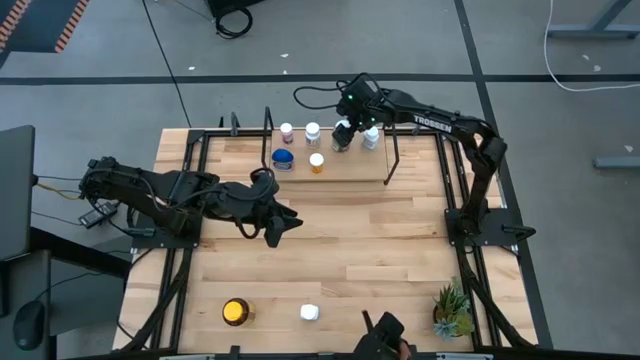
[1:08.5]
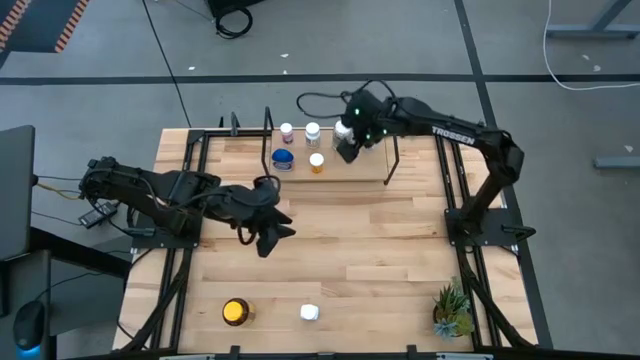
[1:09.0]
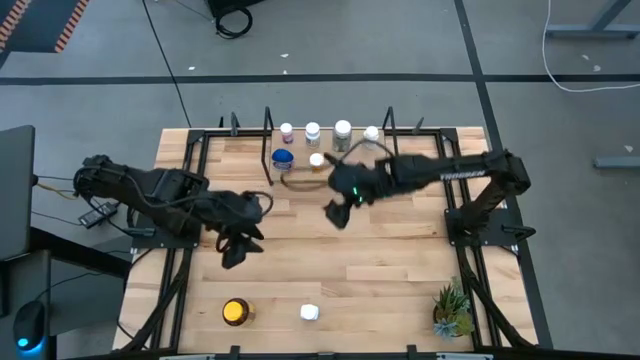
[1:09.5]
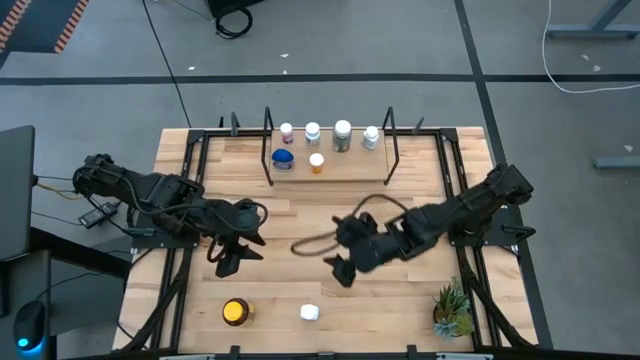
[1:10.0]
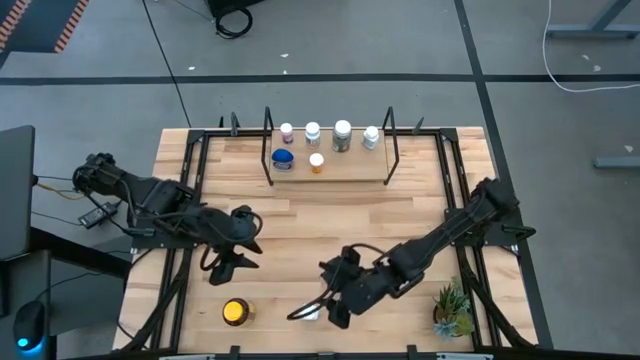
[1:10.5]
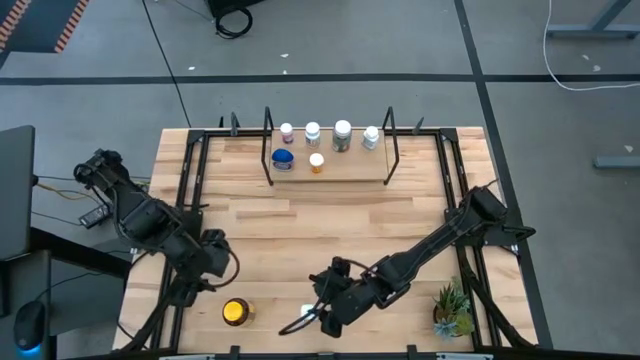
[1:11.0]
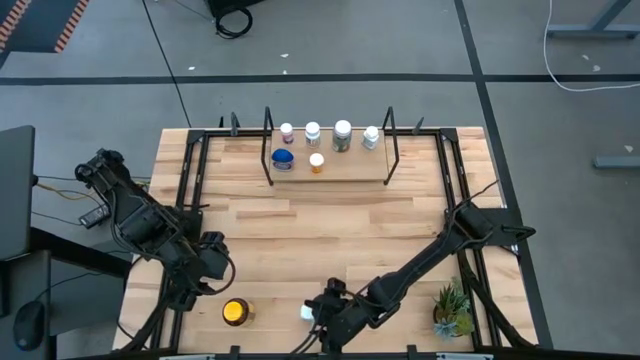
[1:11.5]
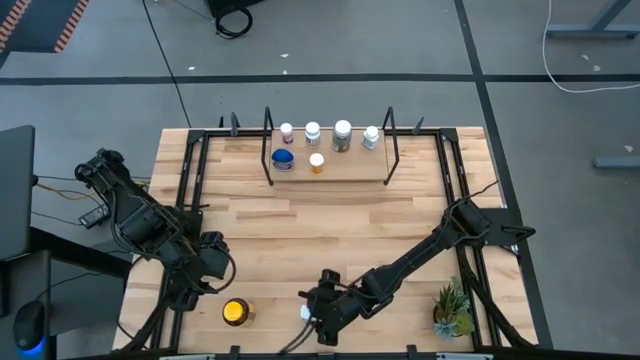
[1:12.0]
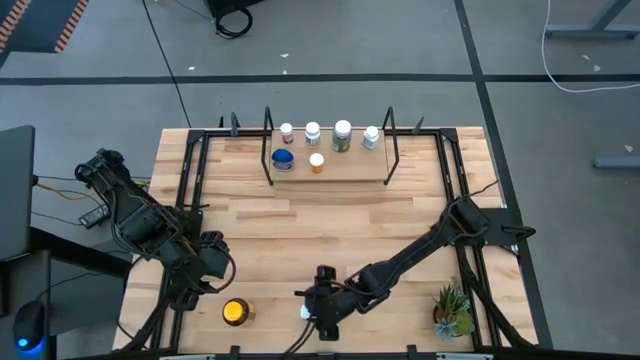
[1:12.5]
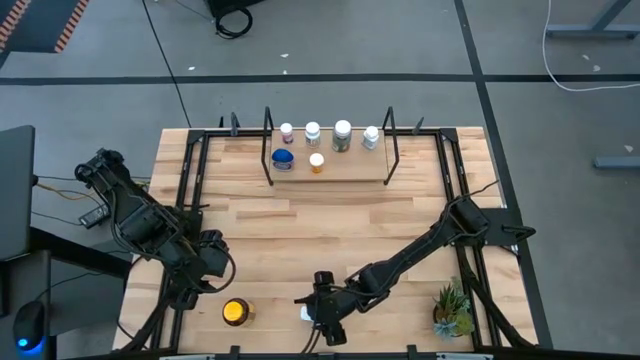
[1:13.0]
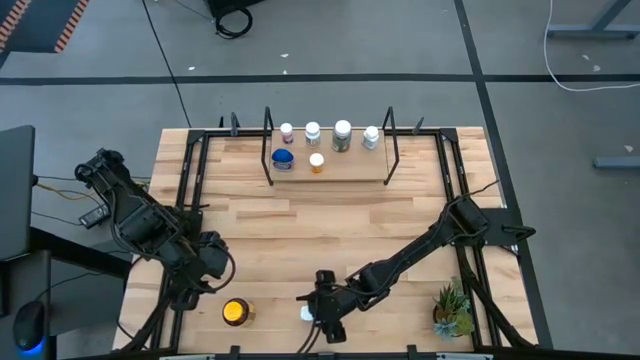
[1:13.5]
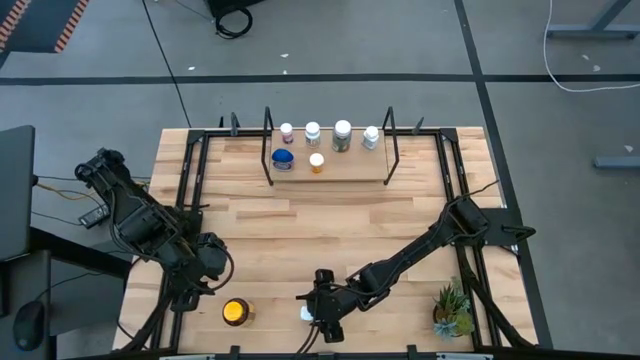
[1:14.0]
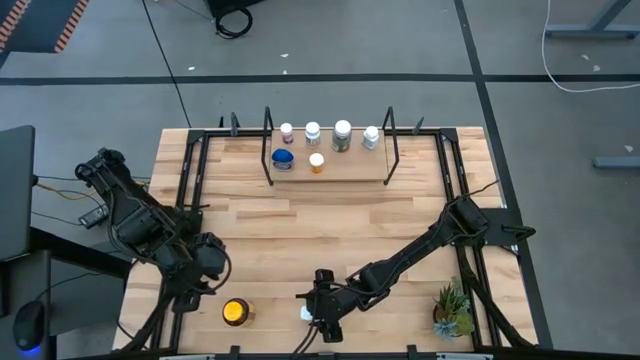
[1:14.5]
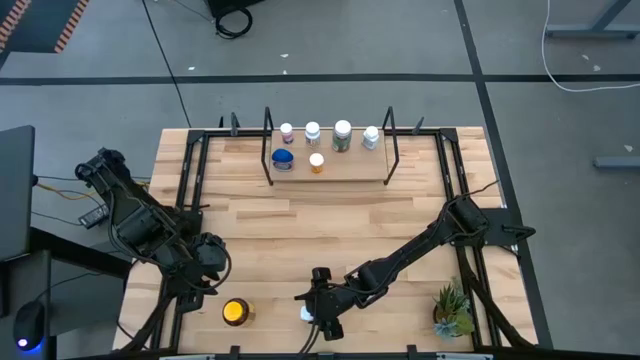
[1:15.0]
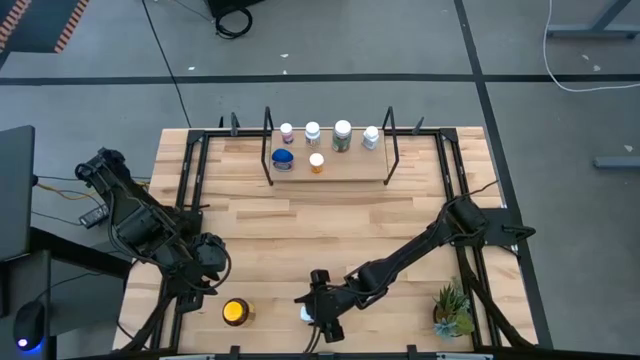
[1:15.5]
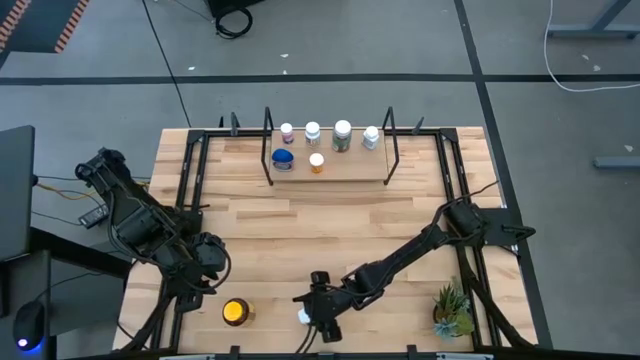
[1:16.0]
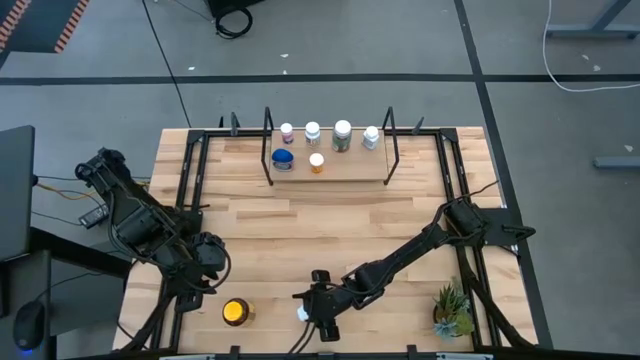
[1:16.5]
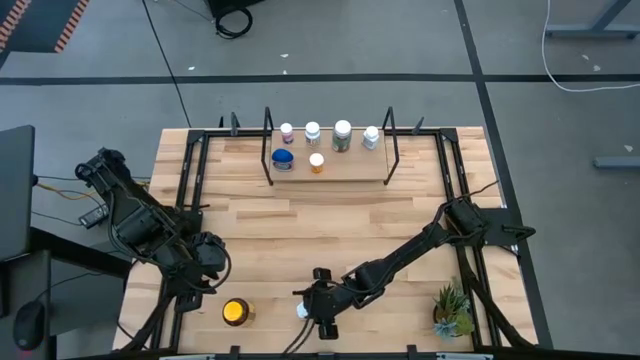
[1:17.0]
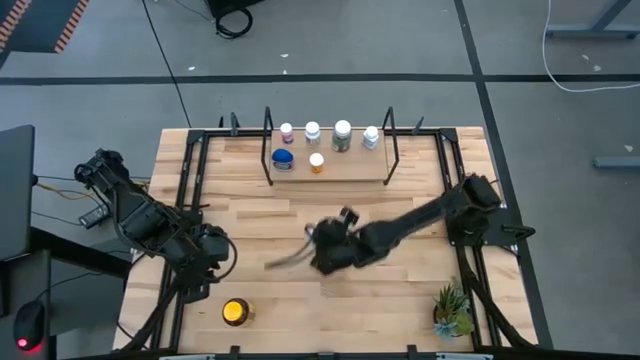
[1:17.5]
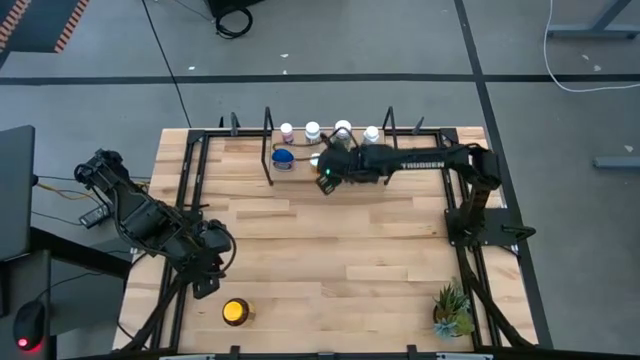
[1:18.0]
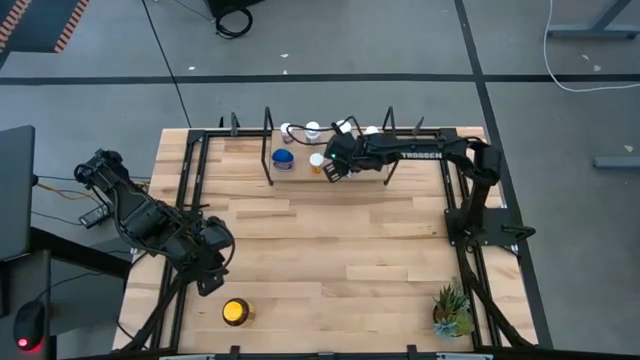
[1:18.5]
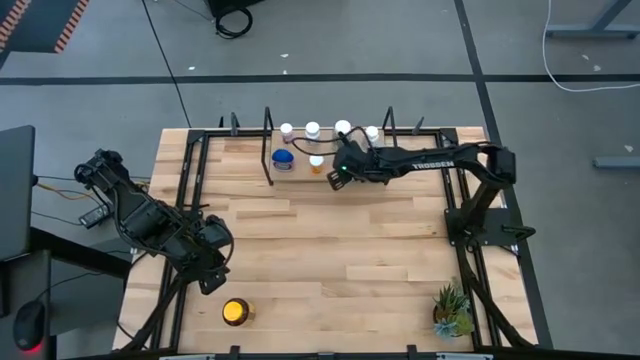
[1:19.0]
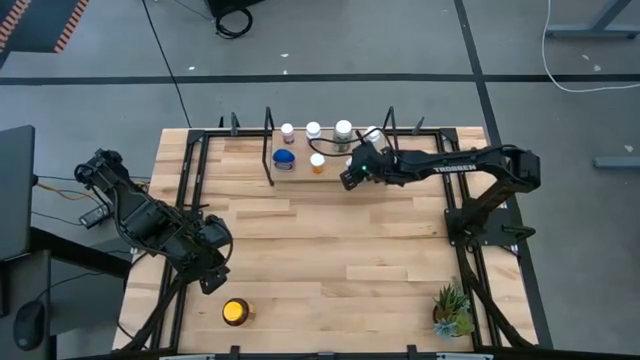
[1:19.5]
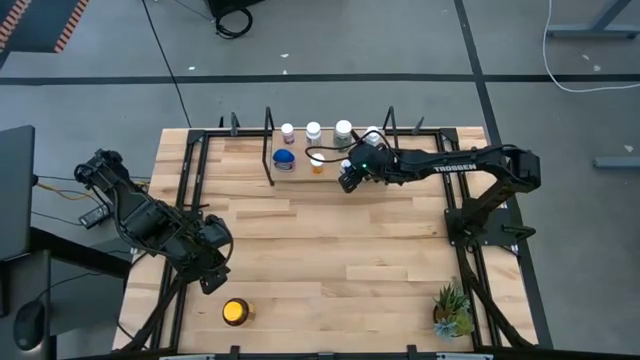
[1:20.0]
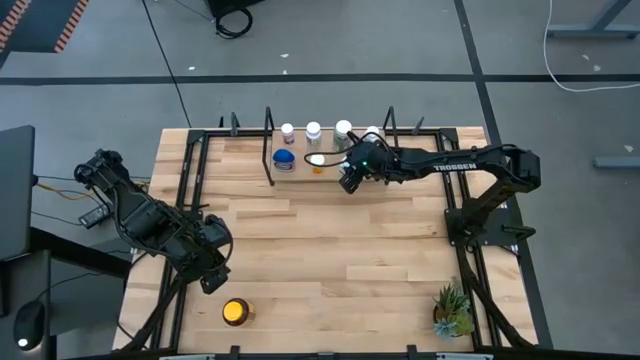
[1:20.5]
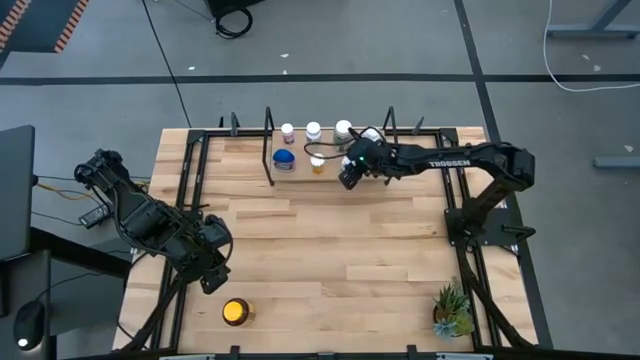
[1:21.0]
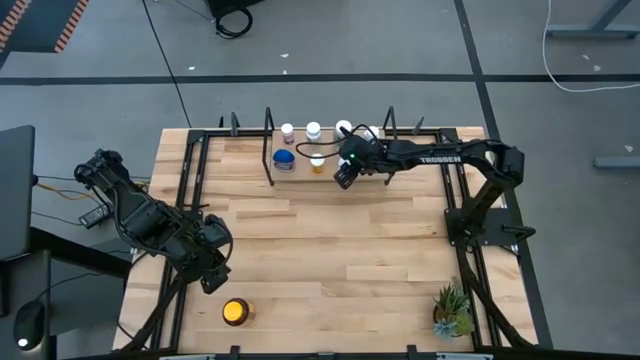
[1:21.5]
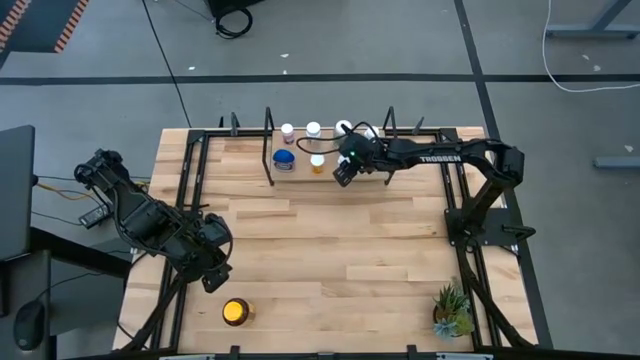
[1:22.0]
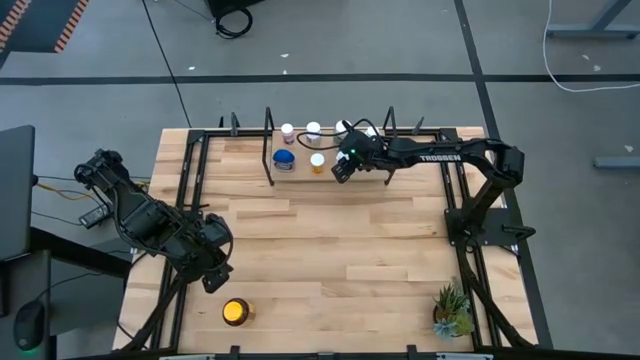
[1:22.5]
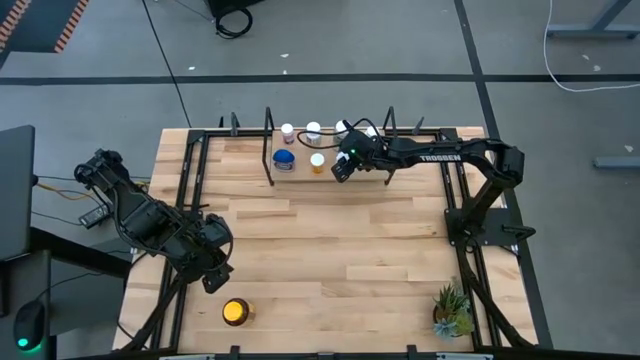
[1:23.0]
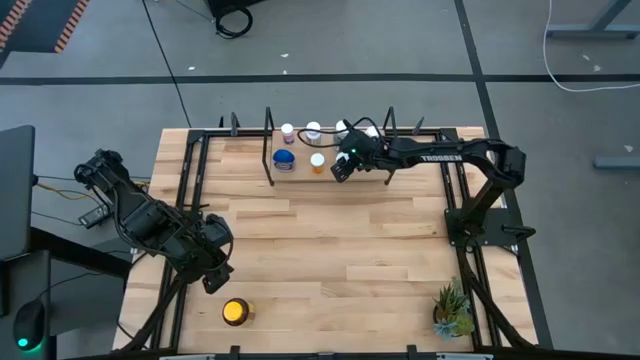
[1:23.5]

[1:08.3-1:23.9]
Task: Pick and place medicine bottles onto shelf by color
Put the white pill bottle on the shelf

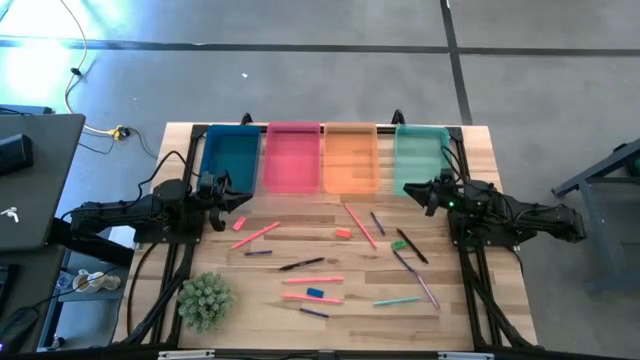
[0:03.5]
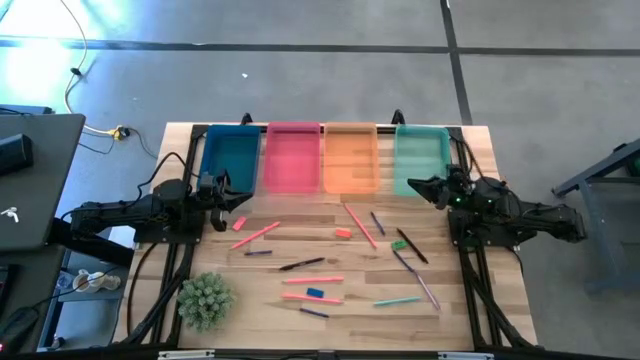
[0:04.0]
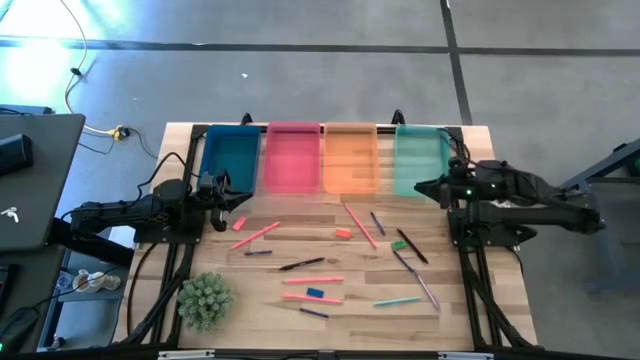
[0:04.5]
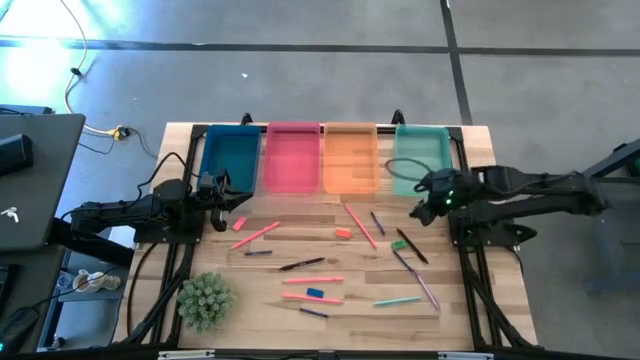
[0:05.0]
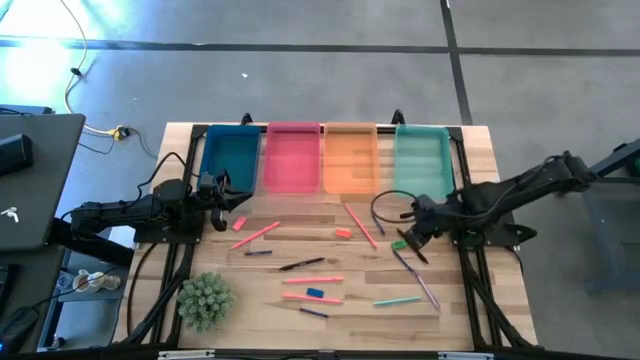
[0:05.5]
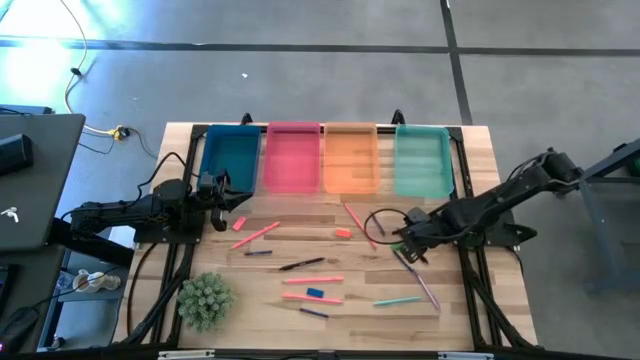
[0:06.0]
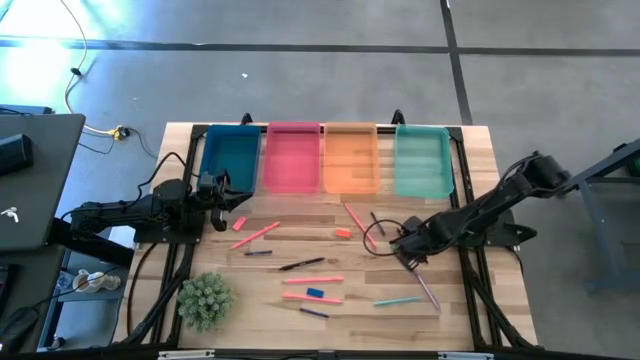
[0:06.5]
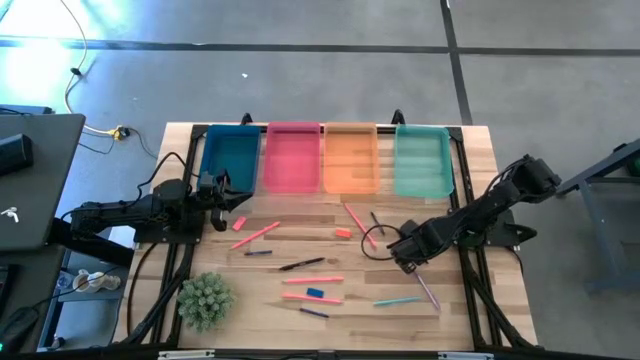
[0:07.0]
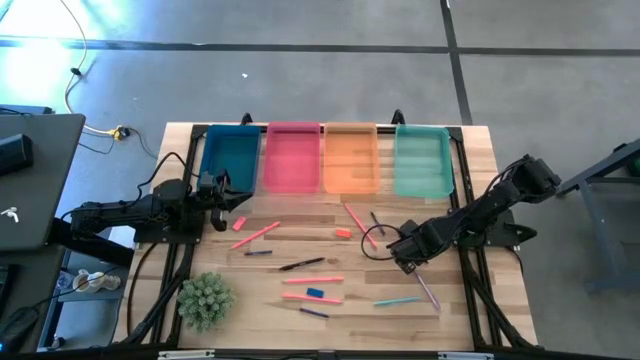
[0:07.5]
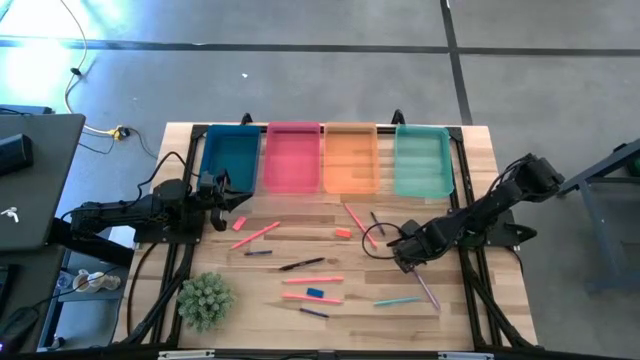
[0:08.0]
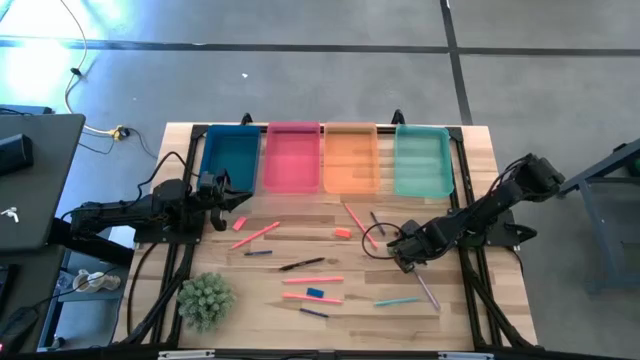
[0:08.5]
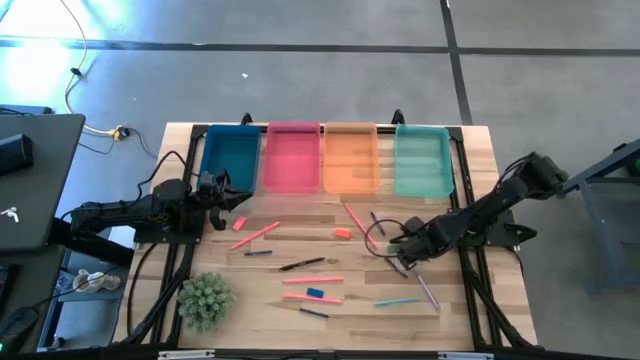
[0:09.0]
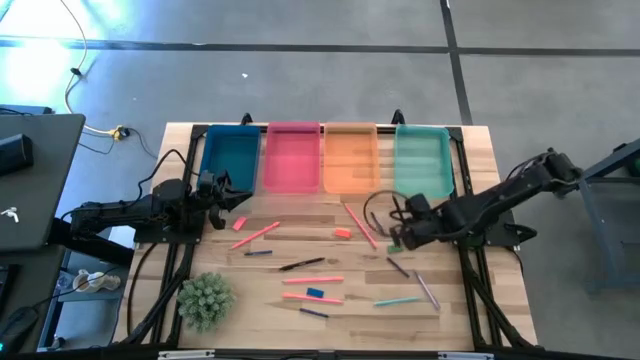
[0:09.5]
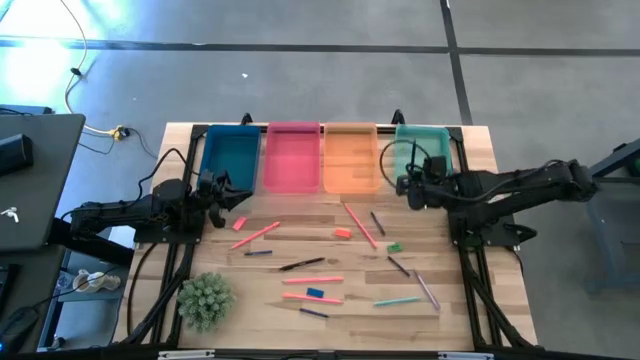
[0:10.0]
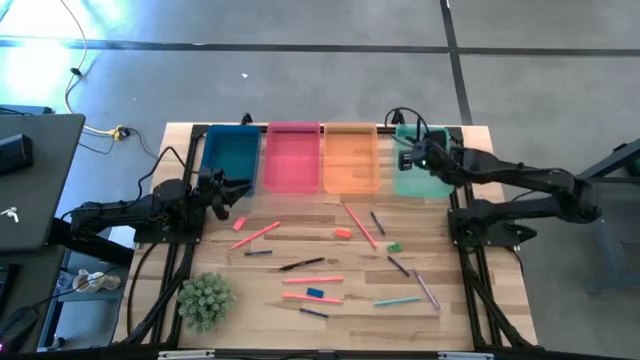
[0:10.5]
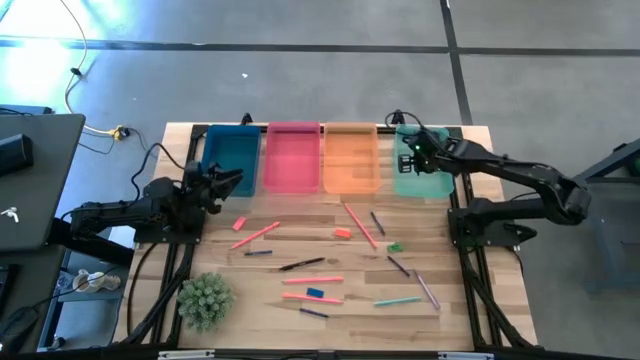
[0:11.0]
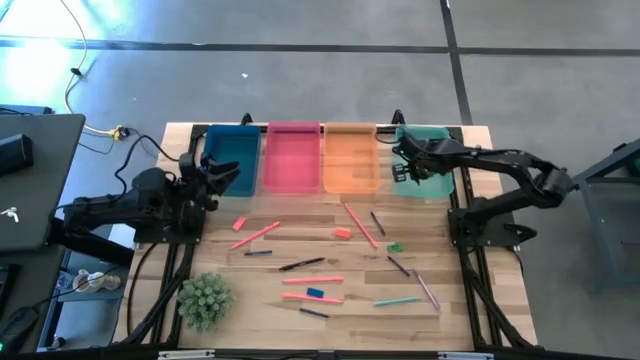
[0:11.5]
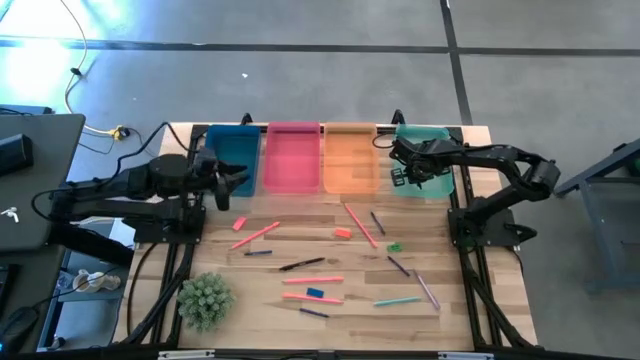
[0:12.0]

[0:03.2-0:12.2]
Task: Sort crayons/erasers/pens/pencils in bins
Put the right black pen into the light green bin
